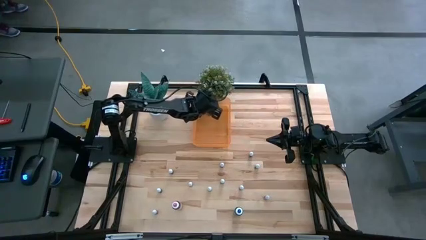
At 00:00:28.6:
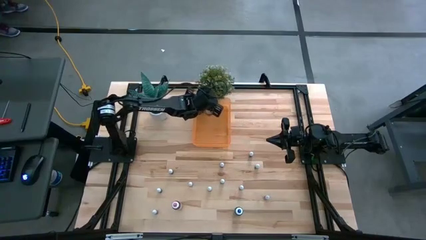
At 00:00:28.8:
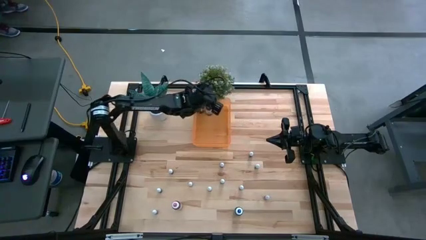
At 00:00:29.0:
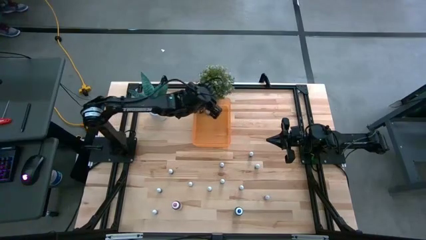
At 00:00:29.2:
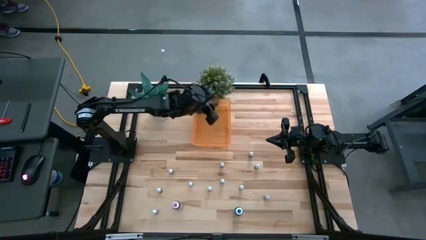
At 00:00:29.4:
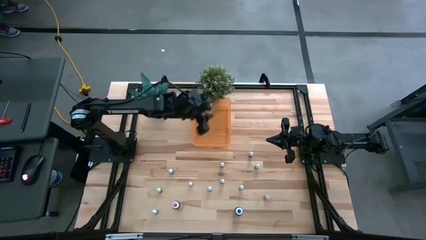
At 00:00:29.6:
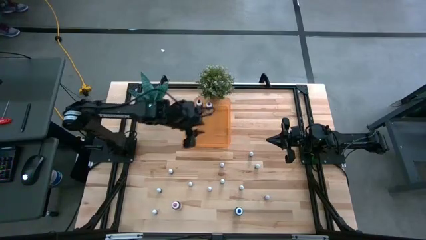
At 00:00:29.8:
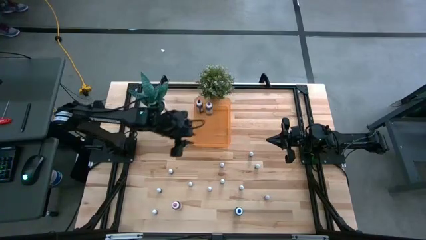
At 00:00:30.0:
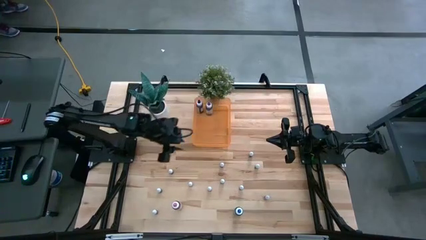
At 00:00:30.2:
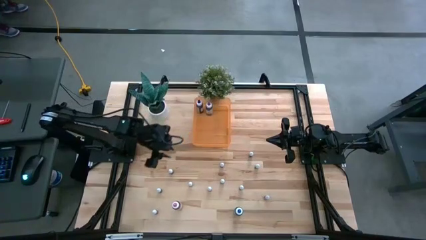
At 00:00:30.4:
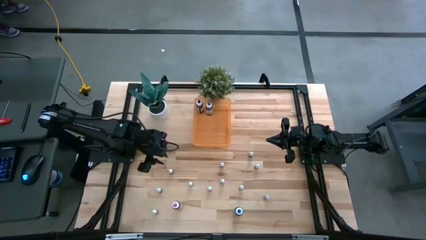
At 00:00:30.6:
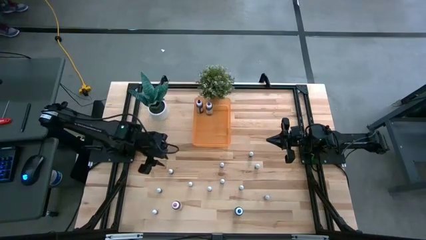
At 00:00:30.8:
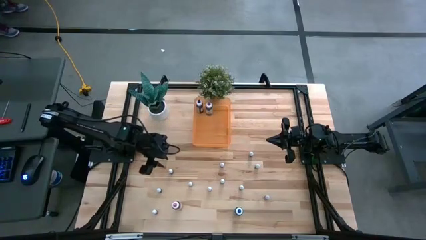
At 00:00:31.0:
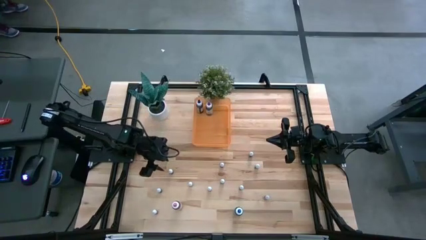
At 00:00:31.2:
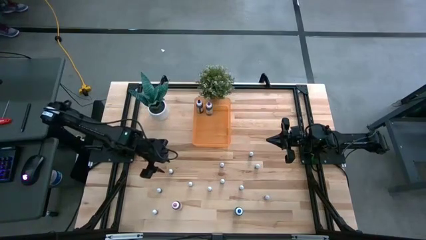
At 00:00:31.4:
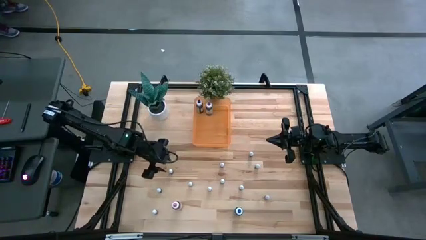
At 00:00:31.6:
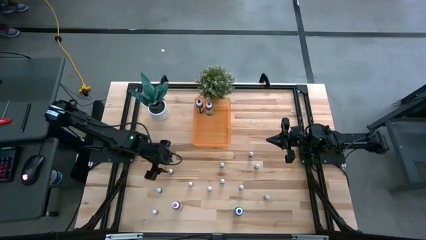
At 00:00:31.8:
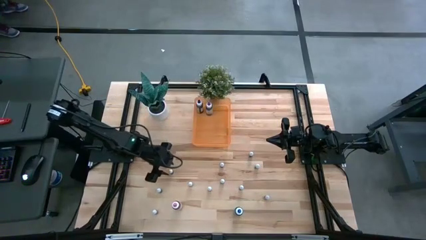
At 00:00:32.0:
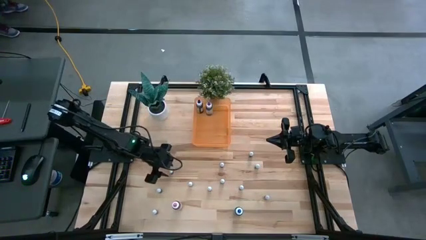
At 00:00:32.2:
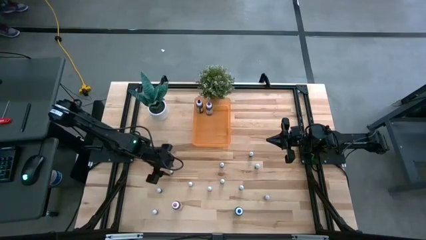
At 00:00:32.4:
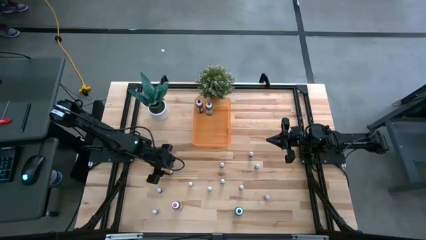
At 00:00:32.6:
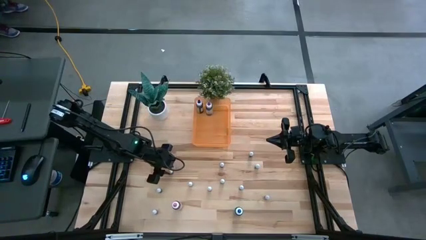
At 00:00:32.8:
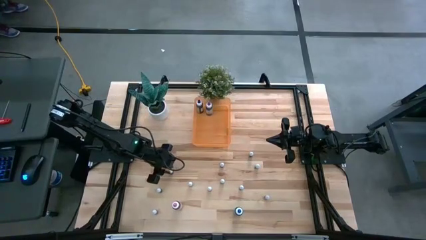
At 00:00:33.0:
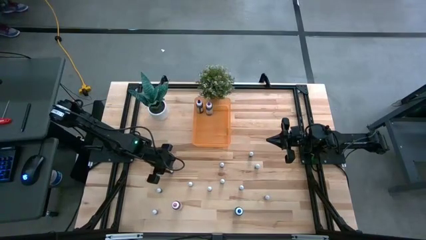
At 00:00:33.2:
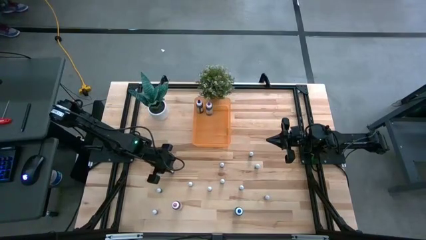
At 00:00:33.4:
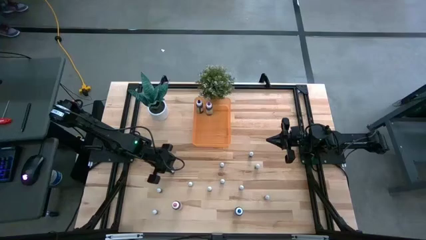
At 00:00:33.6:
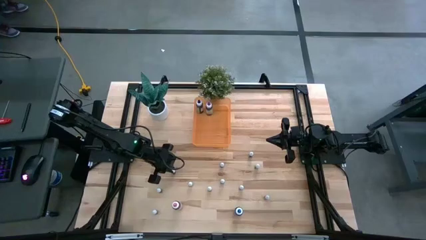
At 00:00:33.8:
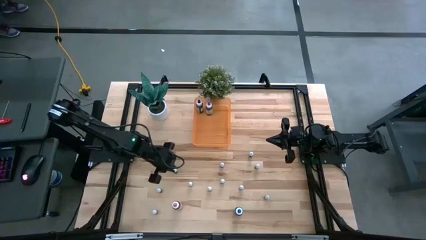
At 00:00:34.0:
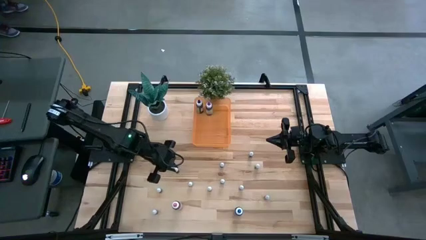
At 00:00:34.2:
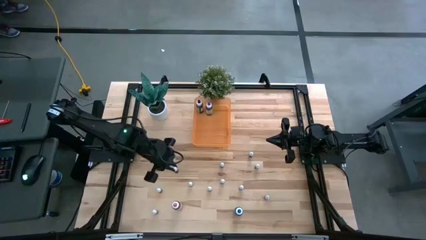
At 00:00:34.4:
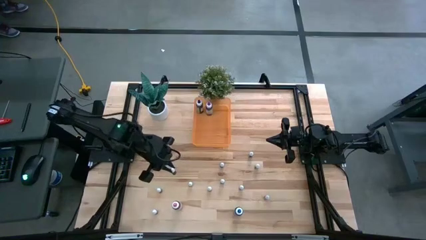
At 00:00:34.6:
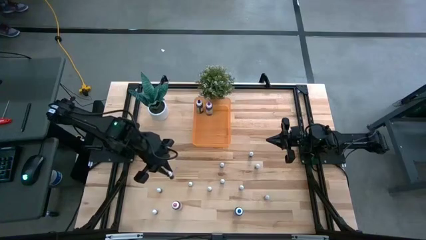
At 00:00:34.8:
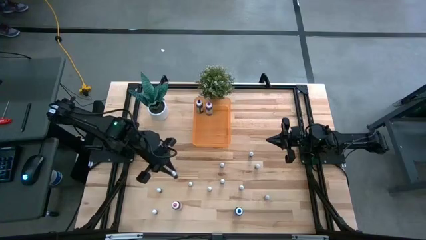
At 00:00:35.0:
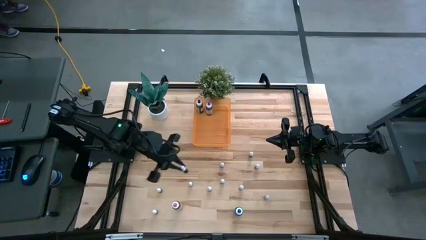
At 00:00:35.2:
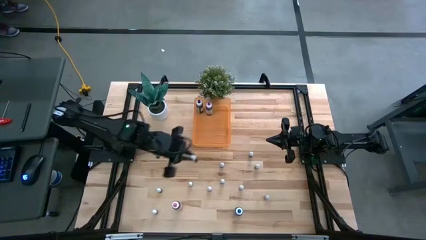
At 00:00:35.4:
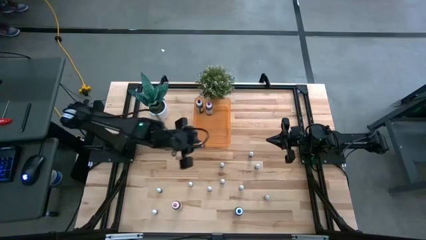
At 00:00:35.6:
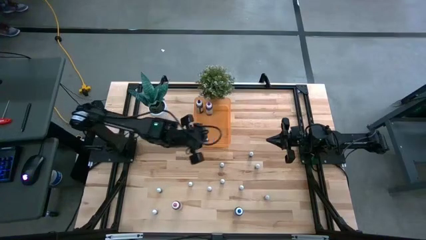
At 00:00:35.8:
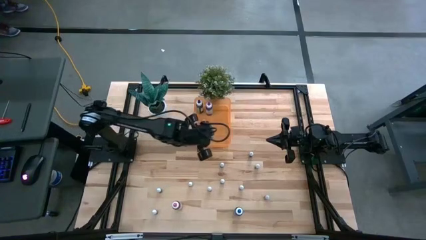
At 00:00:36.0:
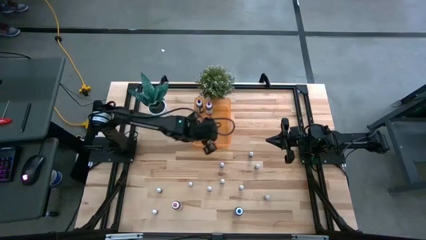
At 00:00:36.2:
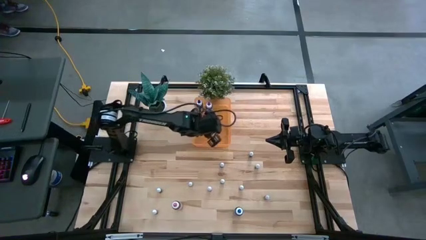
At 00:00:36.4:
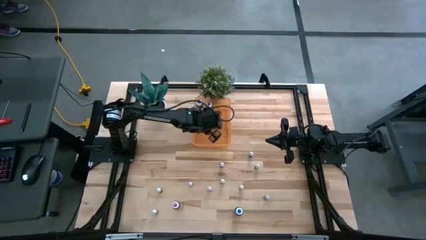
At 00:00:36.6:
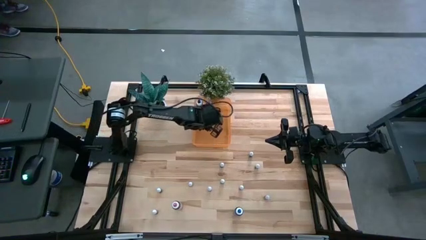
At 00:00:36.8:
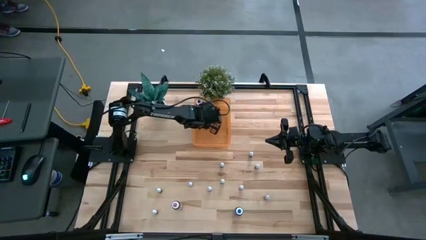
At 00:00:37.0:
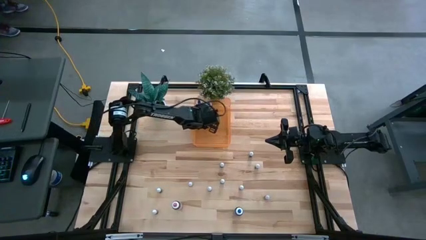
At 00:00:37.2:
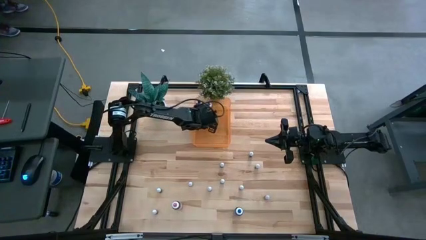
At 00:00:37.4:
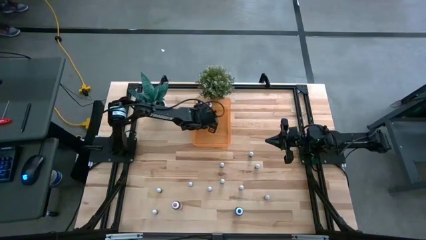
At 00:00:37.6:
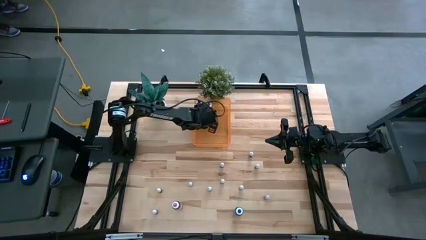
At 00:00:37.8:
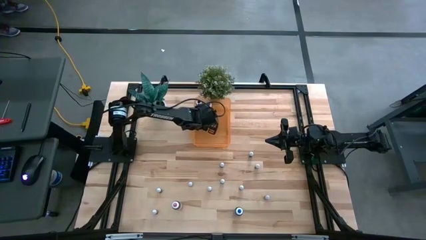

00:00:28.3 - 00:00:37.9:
Task: Pick & Place food coloring
Put the left small dark green food coloring bottle into the orange bin
